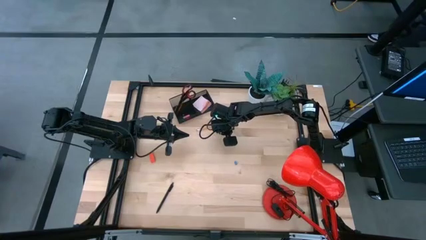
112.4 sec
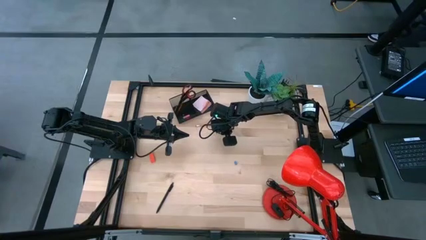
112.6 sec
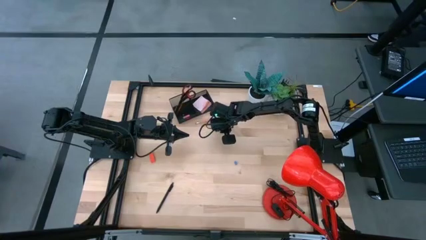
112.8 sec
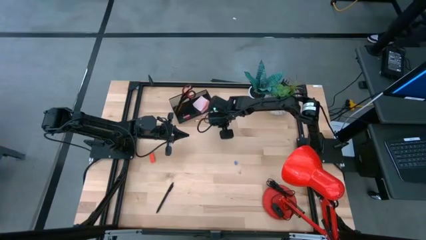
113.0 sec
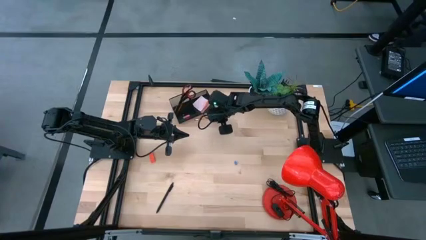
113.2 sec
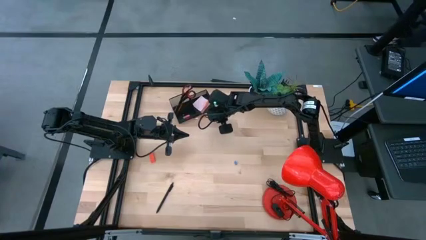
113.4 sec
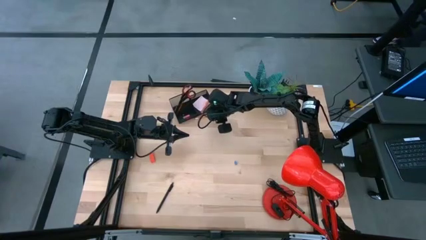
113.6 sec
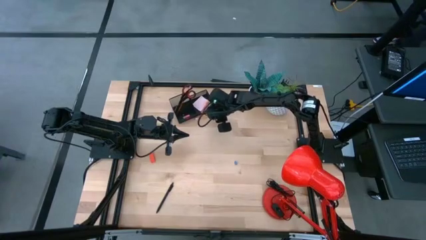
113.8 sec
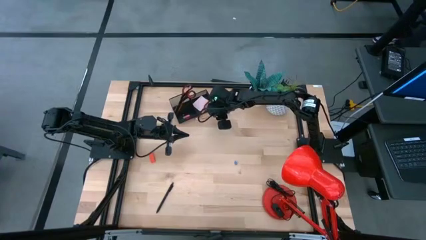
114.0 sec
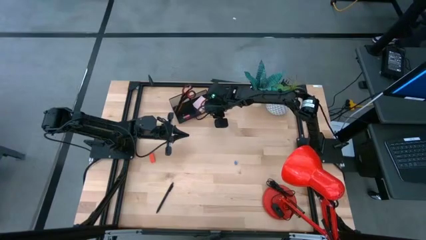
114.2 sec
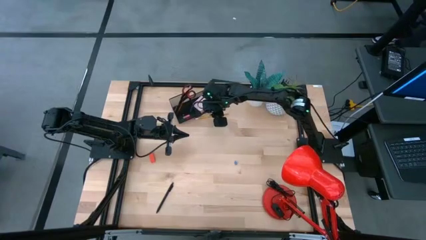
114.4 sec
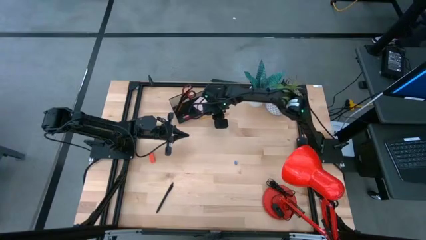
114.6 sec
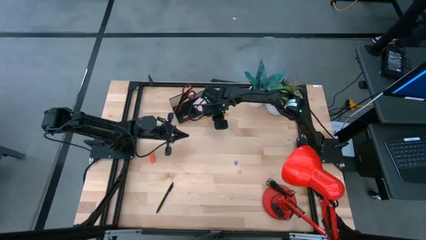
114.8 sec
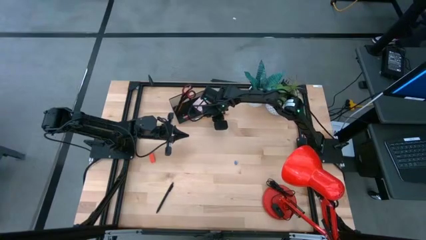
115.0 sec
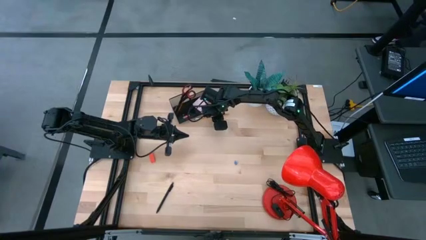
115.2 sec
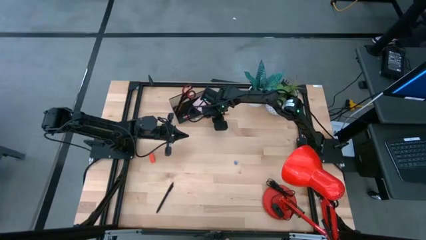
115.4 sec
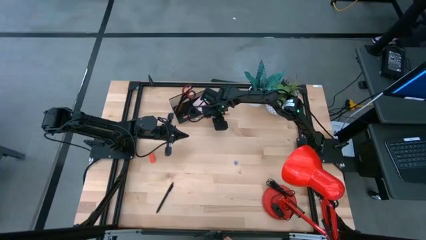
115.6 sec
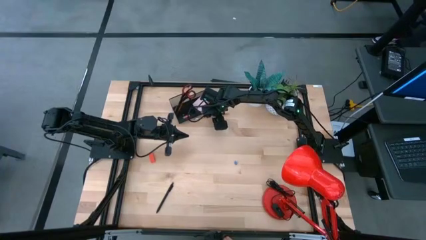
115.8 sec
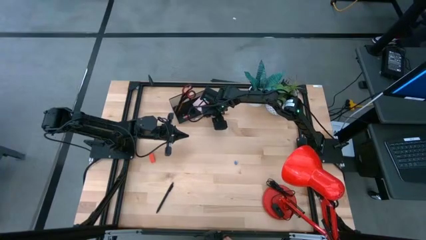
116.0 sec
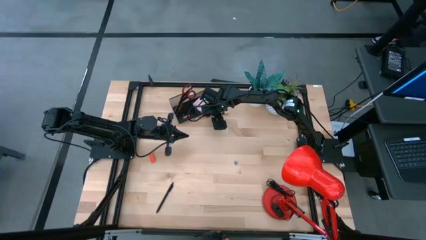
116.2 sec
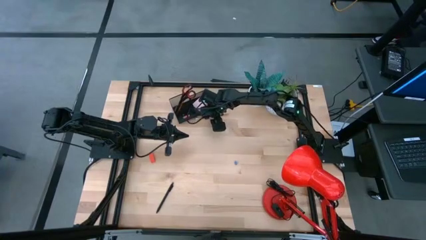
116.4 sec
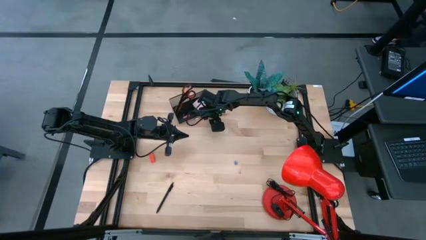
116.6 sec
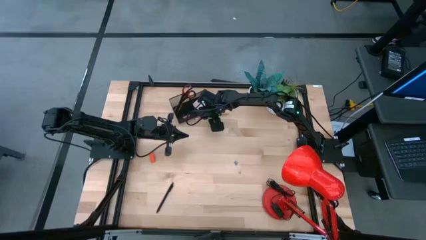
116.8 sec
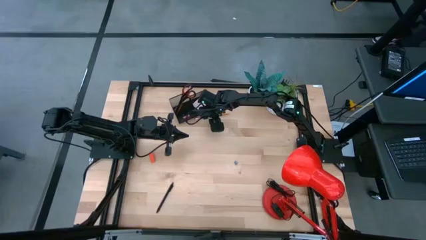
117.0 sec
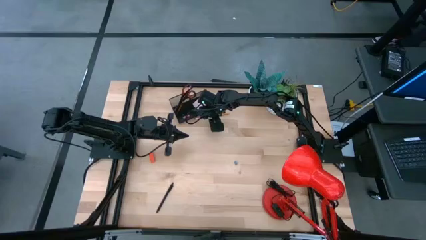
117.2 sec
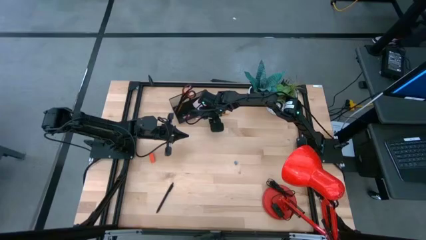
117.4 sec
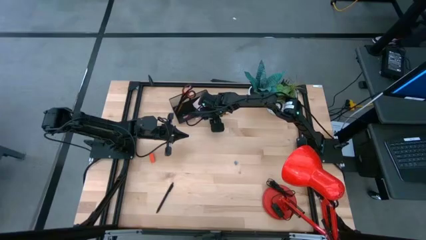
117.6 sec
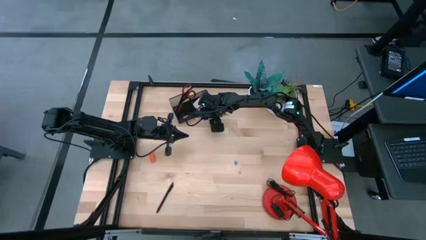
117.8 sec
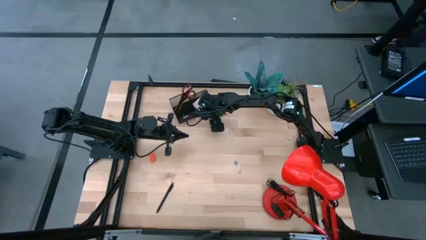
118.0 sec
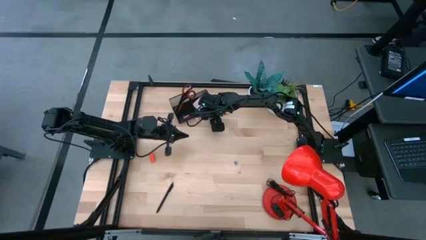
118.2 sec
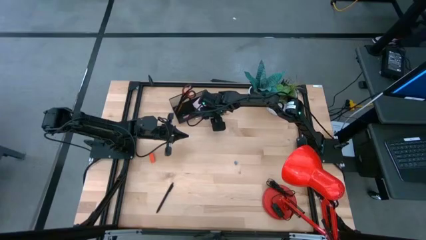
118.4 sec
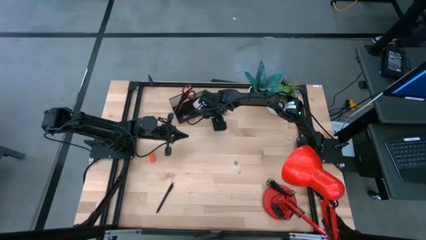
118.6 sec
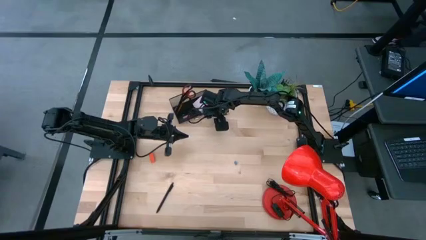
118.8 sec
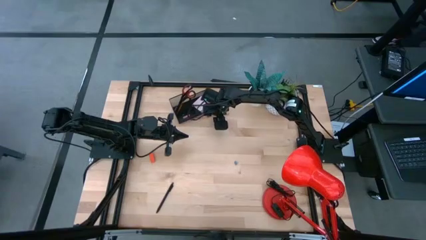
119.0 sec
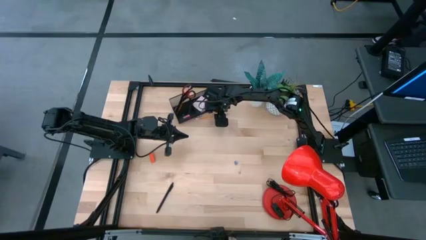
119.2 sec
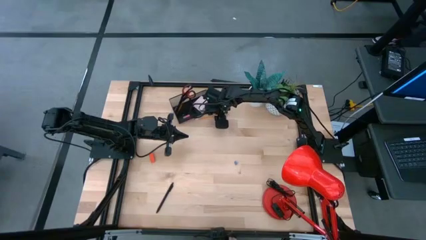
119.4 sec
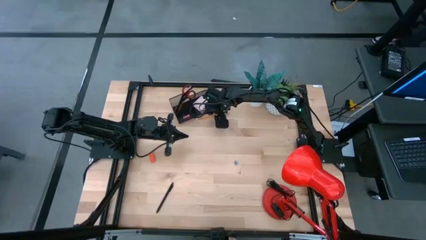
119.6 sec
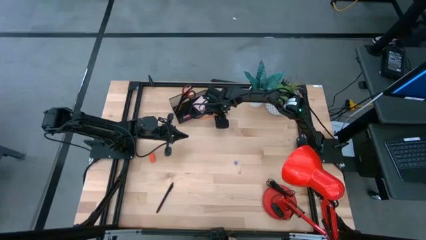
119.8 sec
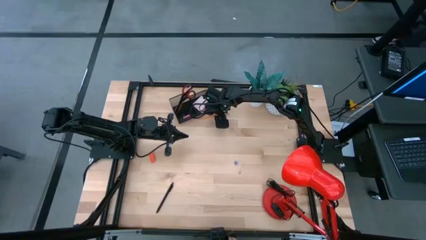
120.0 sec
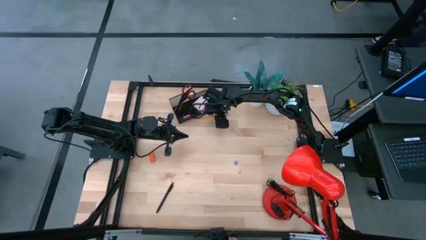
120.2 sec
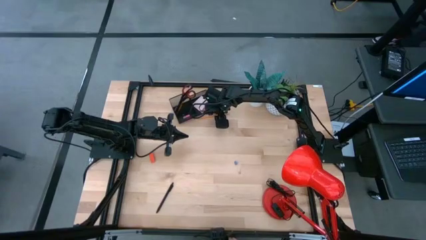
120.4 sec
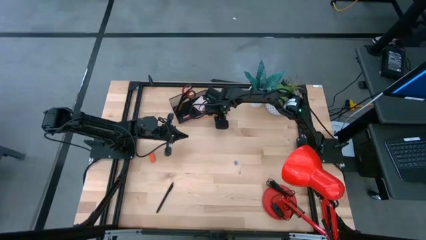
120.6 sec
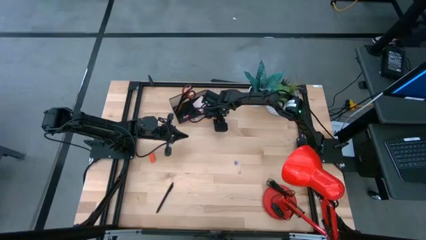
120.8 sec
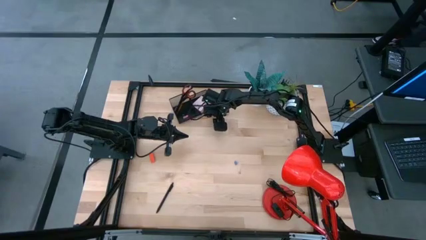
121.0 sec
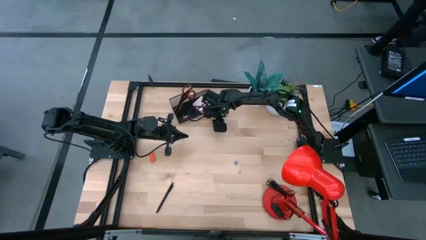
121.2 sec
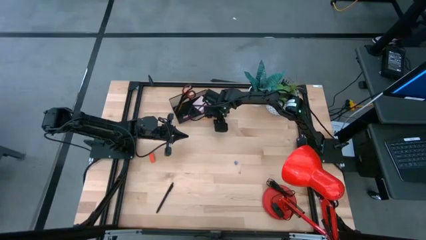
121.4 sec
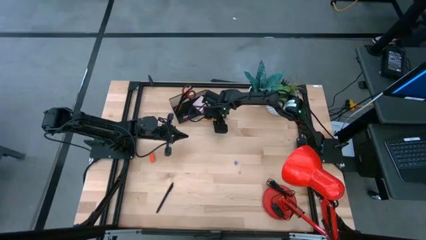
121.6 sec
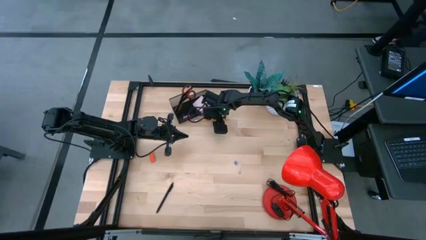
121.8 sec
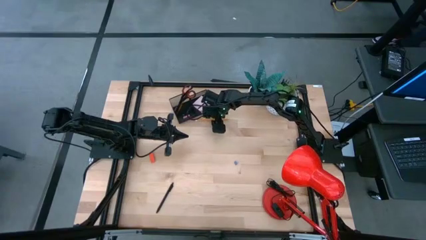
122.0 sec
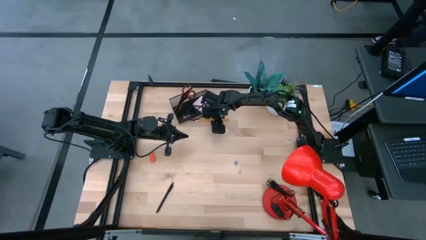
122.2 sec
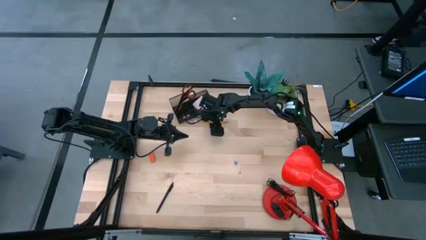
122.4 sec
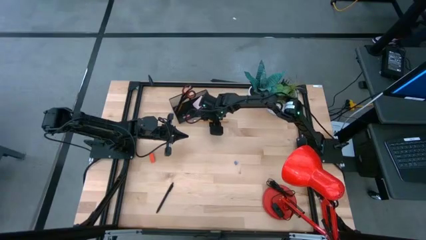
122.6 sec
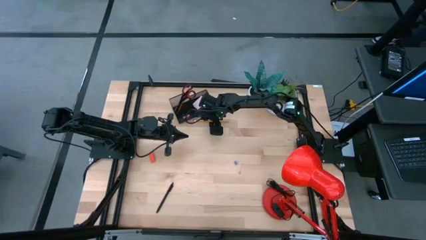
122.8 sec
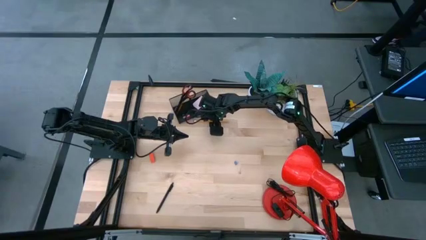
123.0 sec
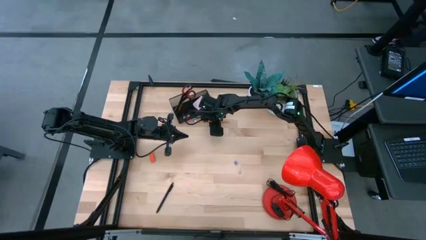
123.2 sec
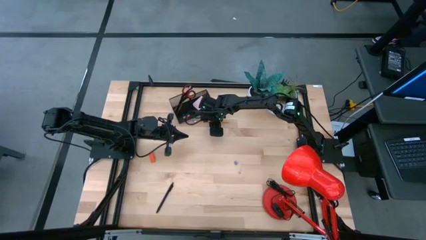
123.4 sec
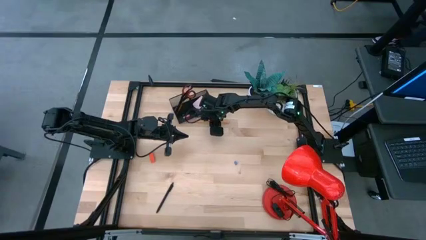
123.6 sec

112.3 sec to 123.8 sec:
Task: Pick and place office supplies into organizer
Put the pencil into the desk organizer
